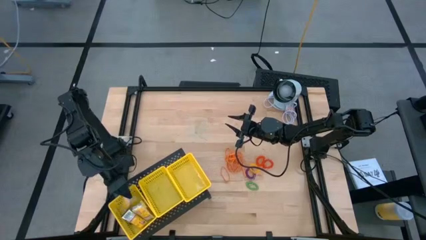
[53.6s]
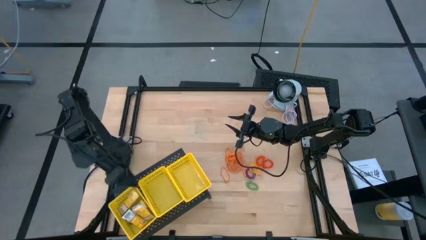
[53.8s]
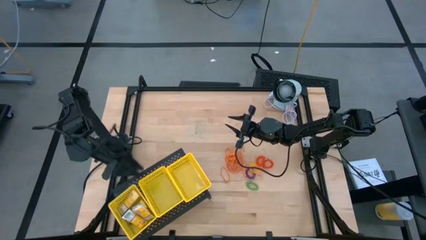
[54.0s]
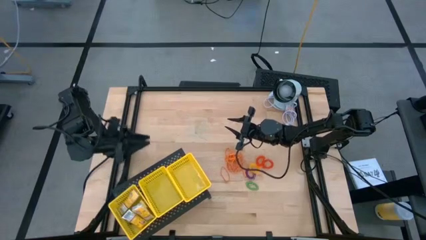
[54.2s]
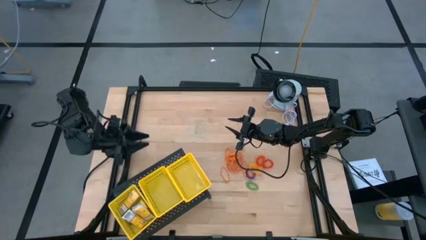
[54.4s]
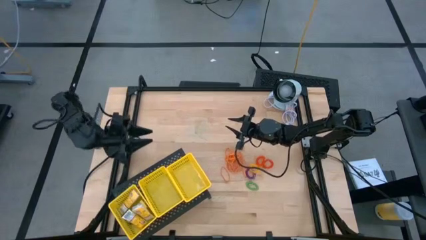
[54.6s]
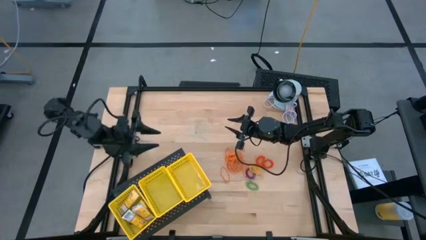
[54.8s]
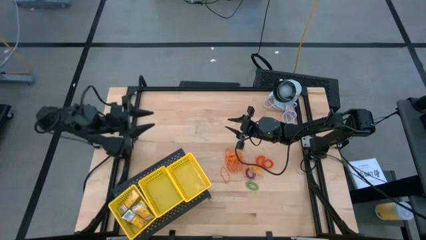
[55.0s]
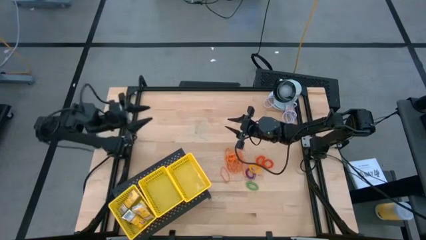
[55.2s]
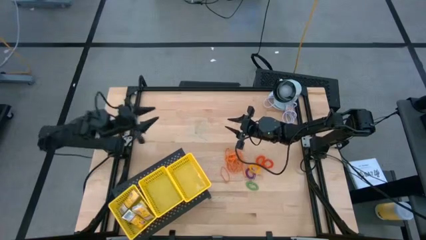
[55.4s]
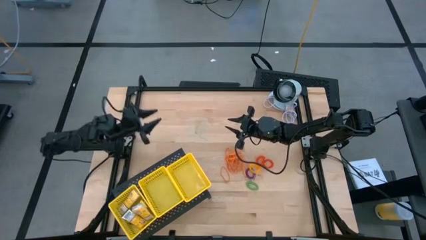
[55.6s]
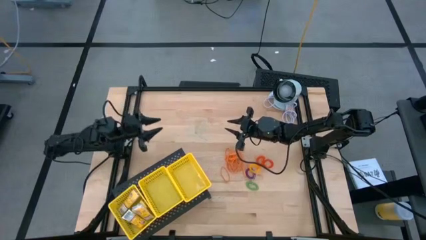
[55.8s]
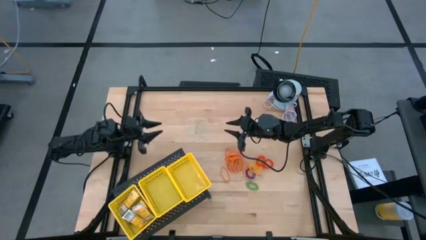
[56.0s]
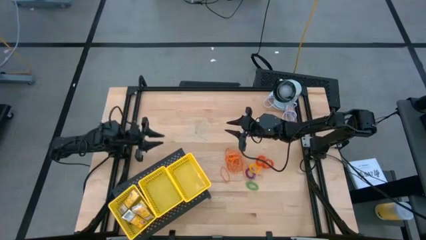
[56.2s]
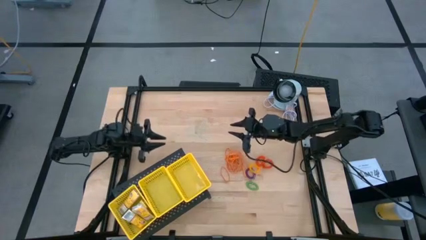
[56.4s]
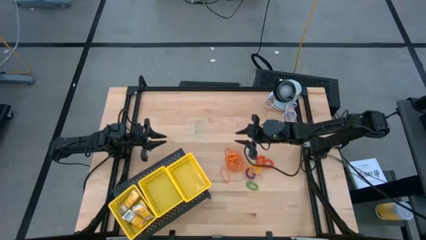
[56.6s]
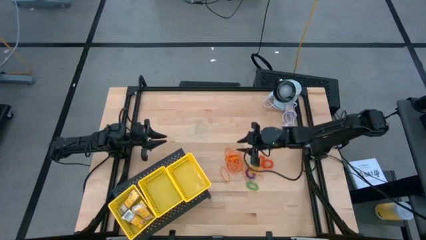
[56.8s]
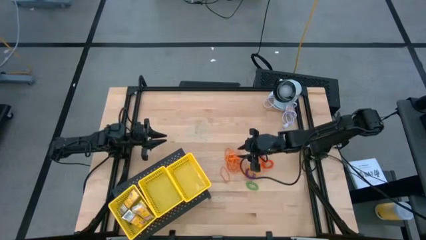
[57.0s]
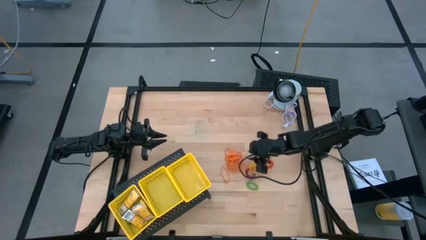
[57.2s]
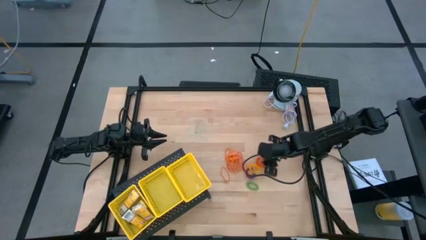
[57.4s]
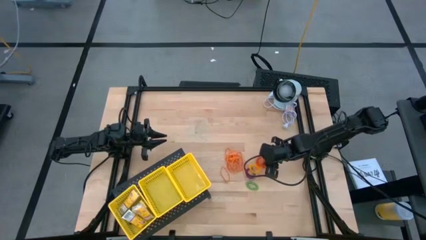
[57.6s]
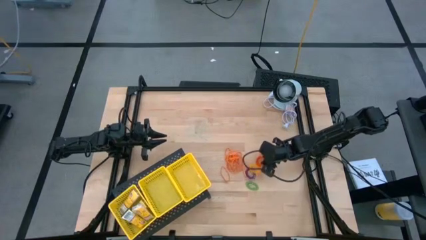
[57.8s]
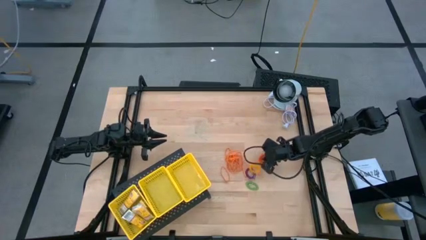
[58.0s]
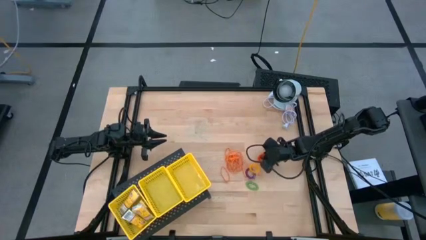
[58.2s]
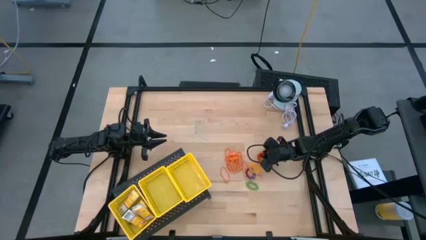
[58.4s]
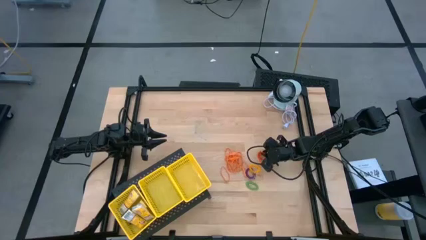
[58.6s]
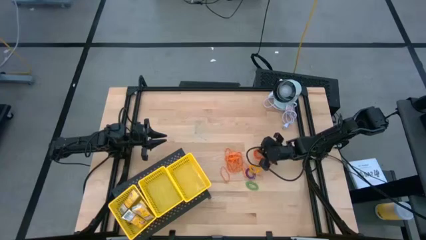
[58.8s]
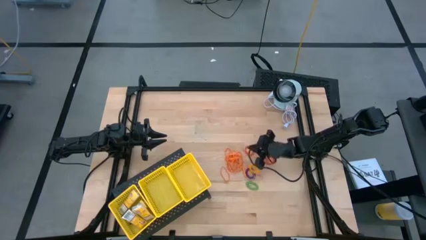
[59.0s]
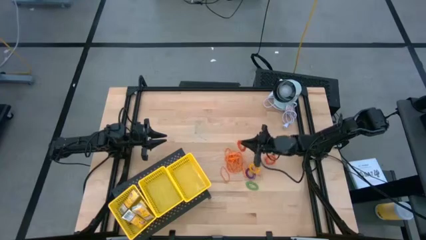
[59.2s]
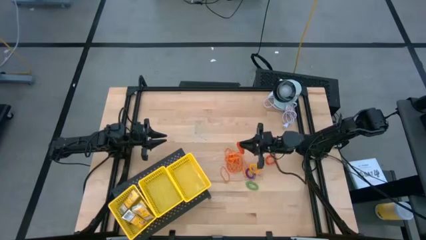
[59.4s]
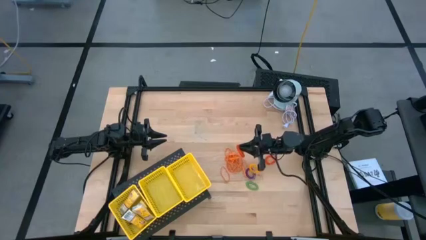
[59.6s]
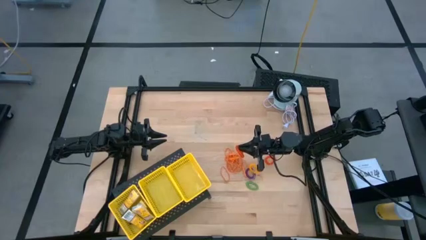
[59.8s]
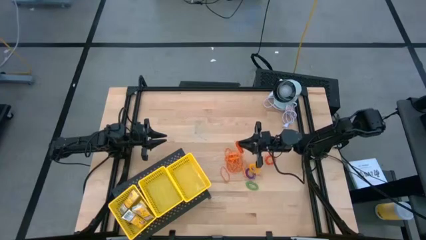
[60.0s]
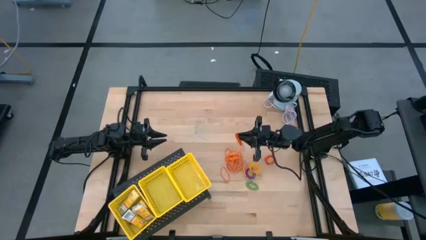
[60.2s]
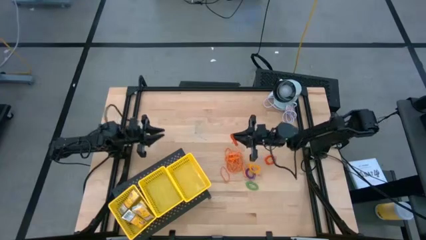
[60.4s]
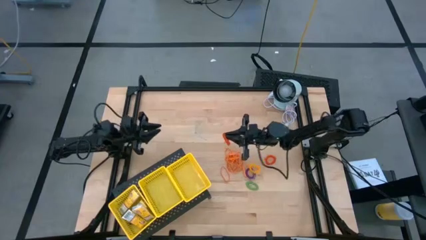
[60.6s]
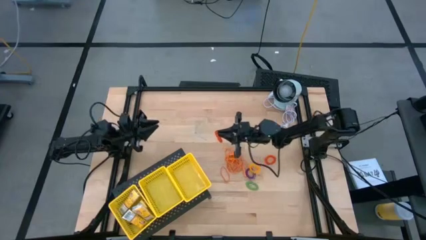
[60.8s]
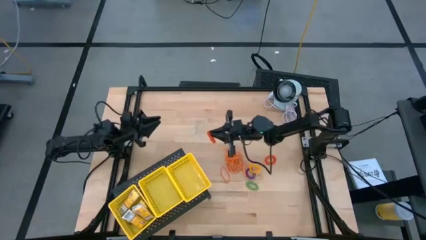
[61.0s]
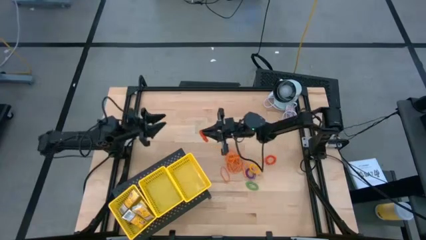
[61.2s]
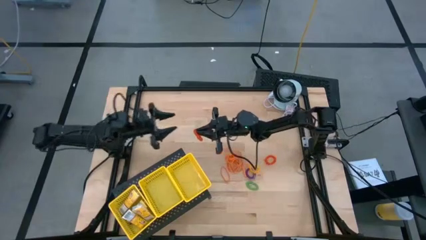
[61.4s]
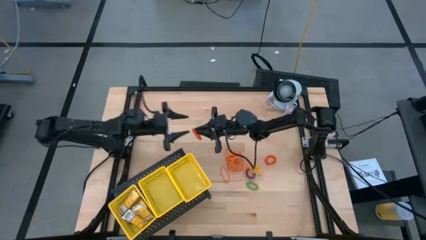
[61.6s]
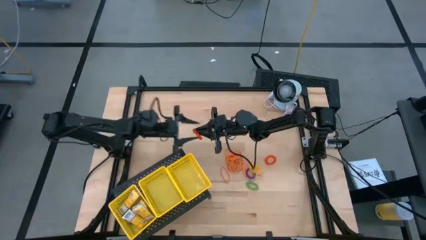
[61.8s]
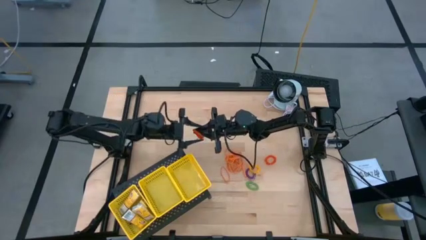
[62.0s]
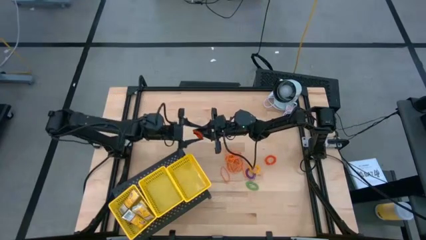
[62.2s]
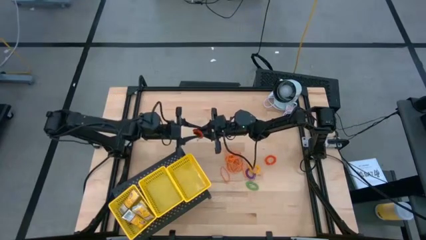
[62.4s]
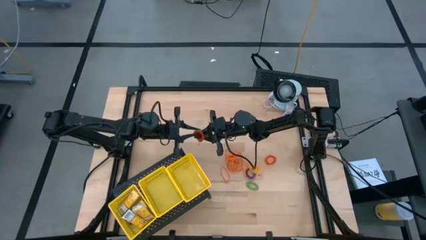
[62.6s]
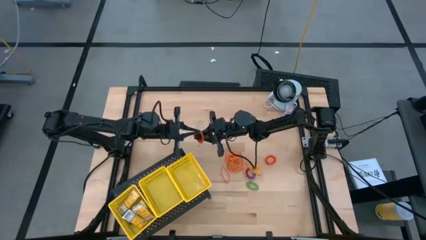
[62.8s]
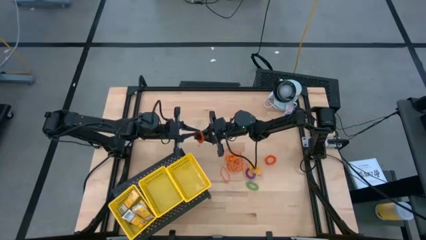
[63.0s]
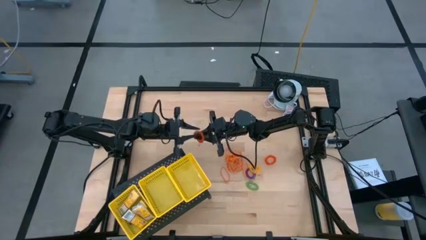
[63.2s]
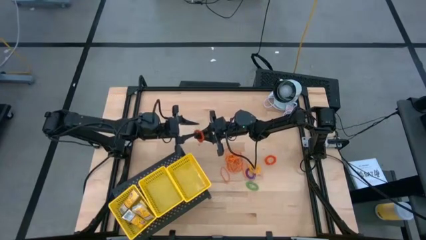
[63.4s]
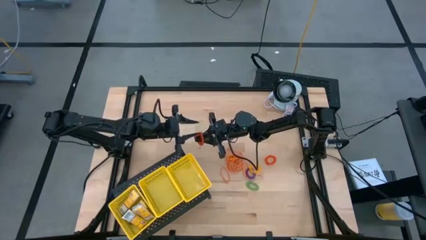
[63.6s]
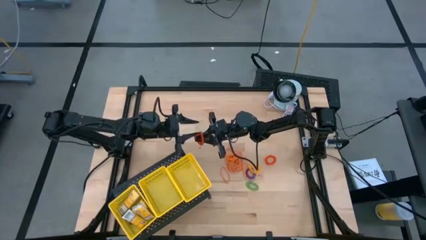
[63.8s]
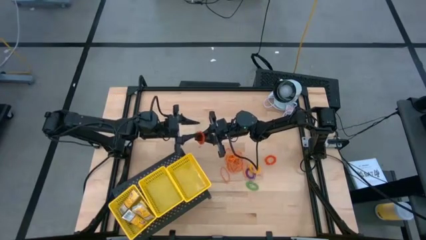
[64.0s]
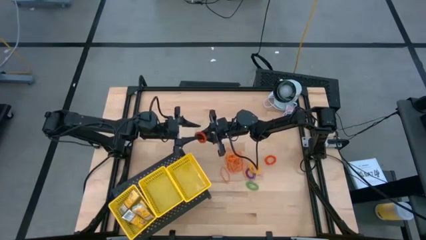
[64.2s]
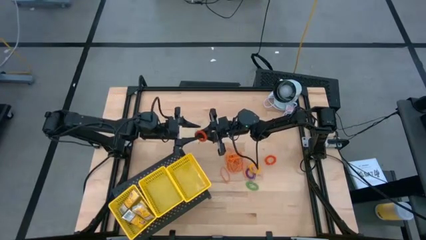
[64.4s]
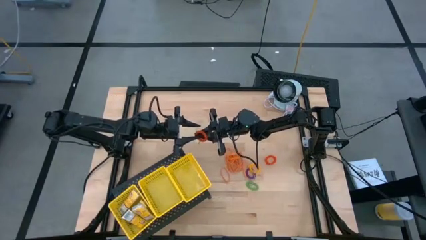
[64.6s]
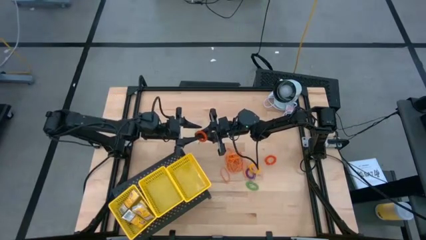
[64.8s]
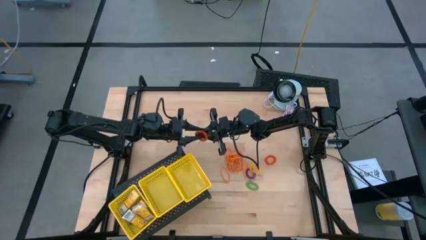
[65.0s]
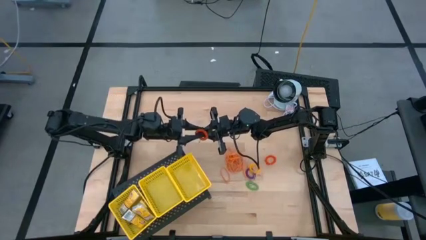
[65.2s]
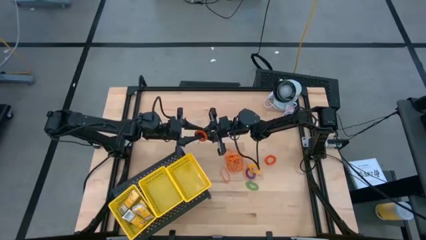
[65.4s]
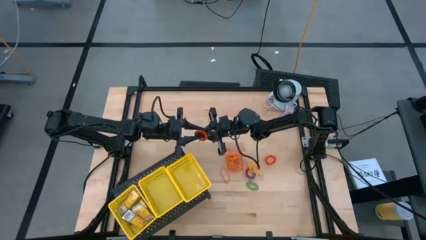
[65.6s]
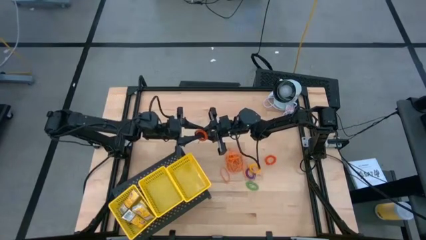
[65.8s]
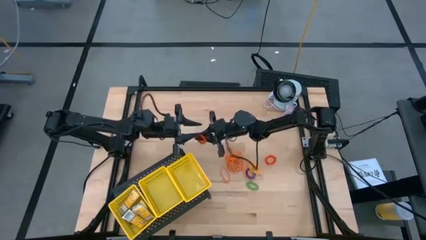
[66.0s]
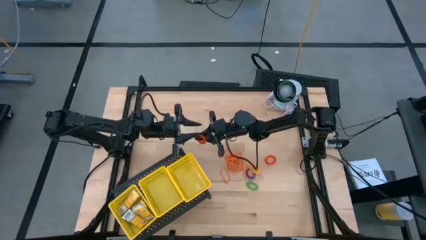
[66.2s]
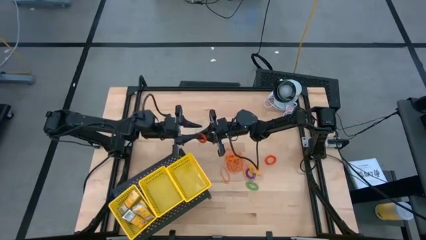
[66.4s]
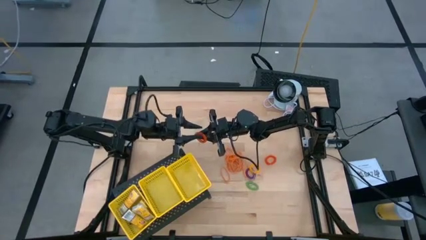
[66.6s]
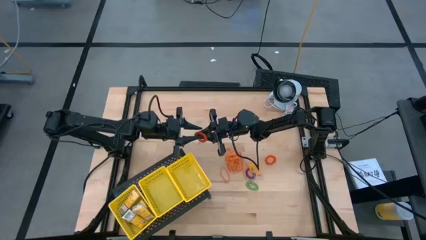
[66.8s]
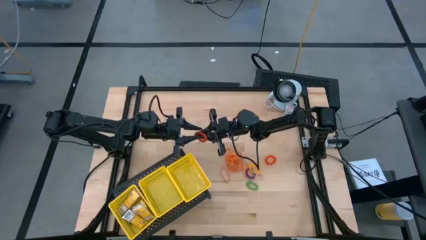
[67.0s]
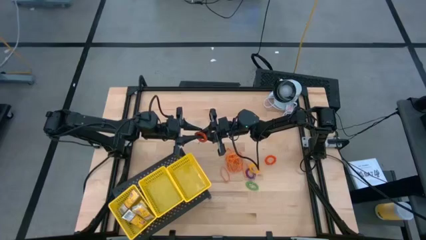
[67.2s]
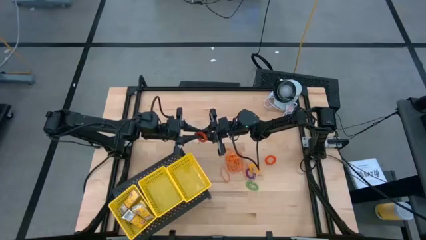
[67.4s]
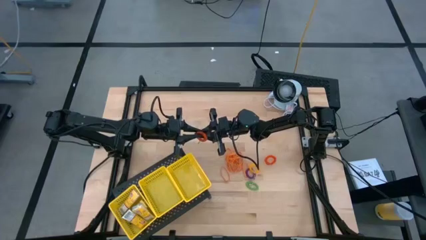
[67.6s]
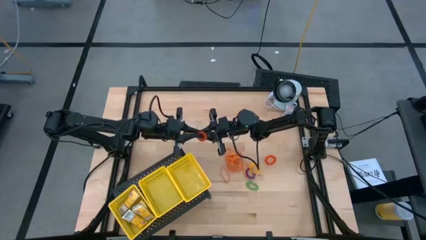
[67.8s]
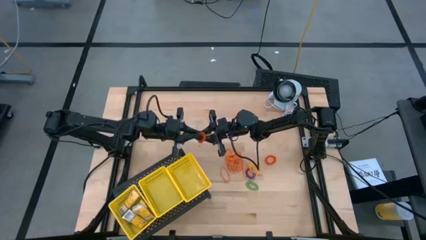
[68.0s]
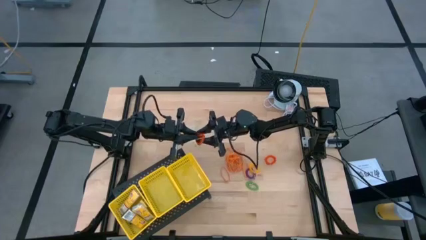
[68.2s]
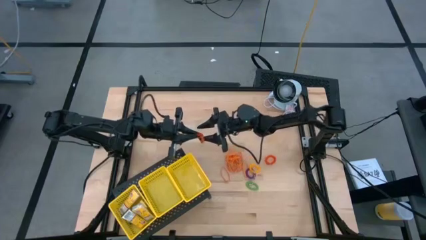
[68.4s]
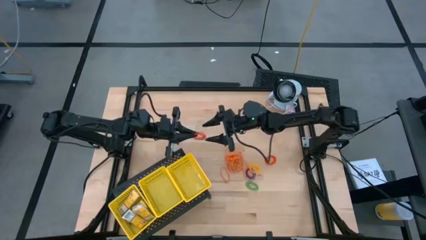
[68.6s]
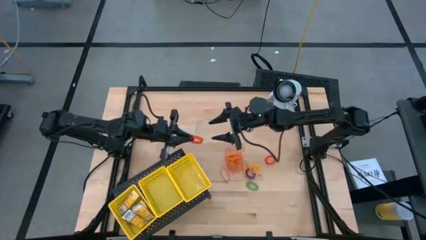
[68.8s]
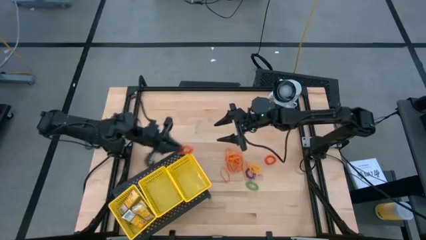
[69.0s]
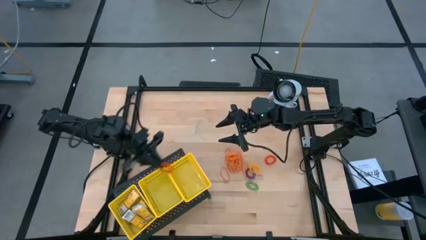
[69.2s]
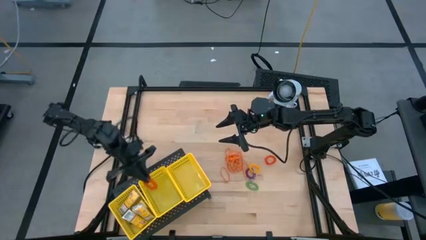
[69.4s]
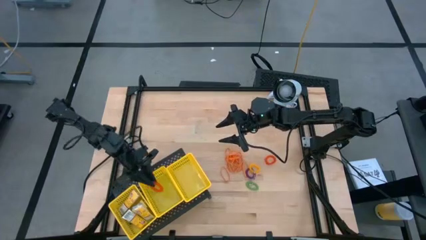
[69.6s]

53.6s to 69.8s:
Task: Pick & Place Office Desk Supplies
Put the orange spring keychain into the center yellow bin on the shelf
